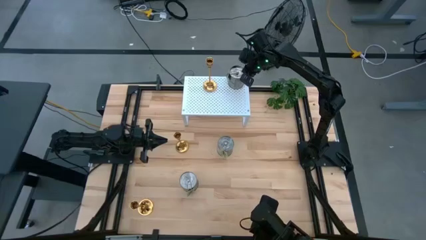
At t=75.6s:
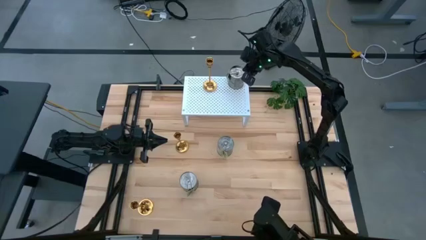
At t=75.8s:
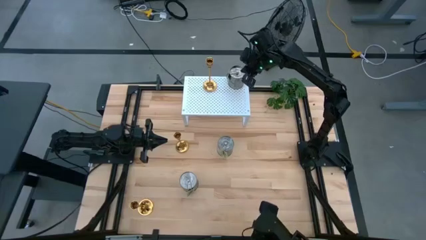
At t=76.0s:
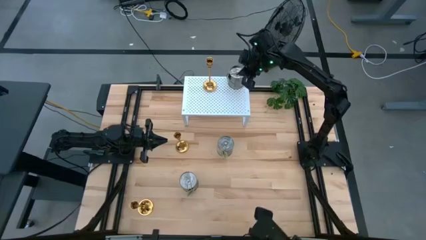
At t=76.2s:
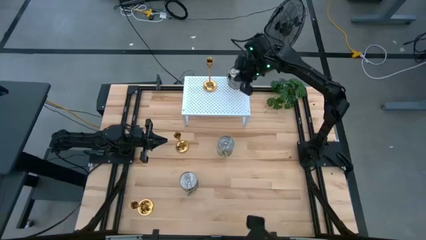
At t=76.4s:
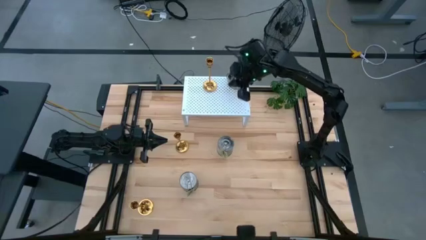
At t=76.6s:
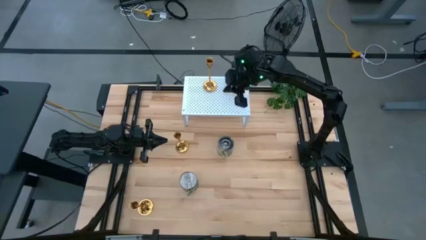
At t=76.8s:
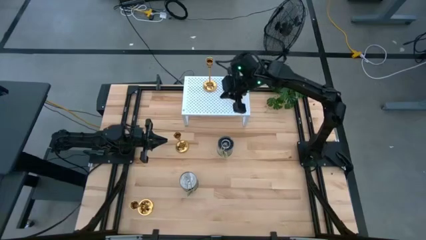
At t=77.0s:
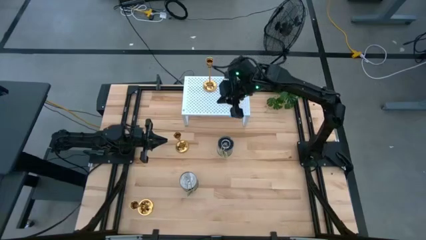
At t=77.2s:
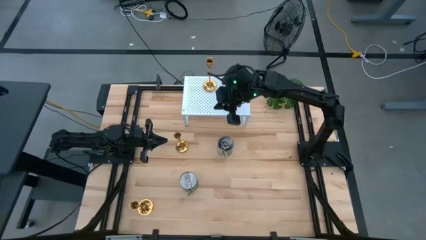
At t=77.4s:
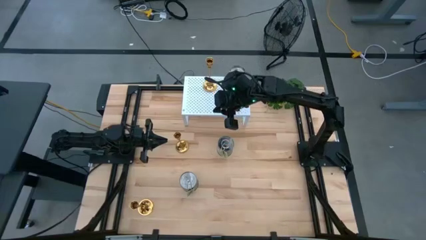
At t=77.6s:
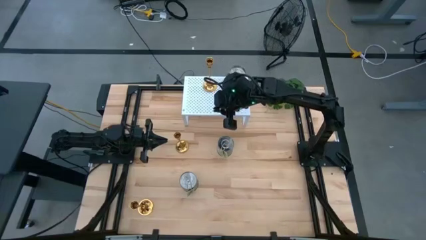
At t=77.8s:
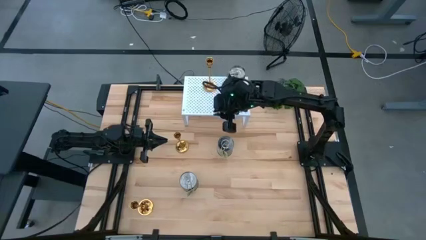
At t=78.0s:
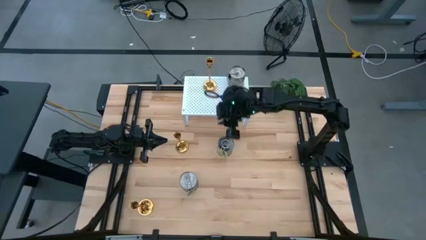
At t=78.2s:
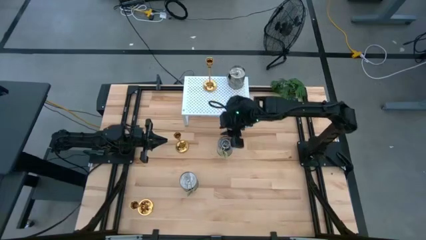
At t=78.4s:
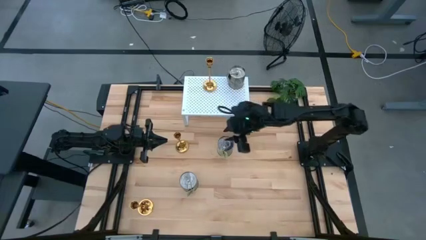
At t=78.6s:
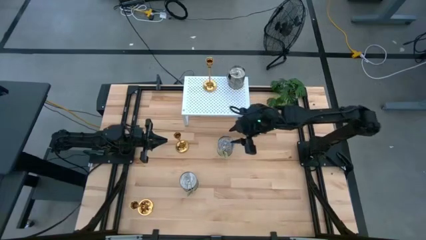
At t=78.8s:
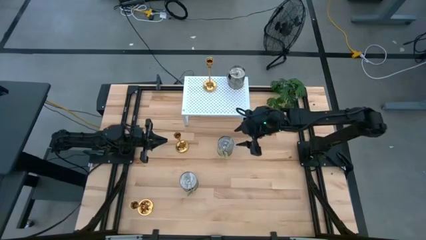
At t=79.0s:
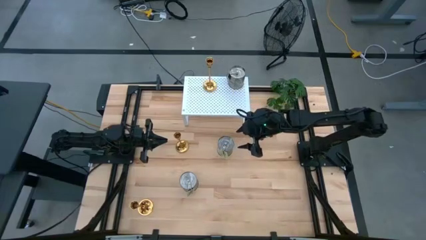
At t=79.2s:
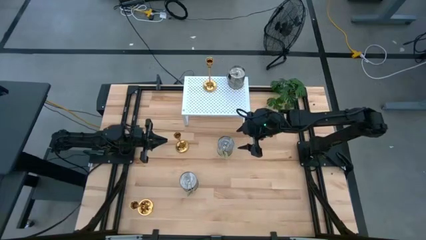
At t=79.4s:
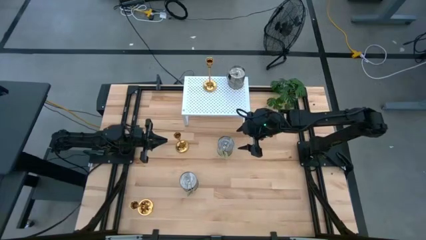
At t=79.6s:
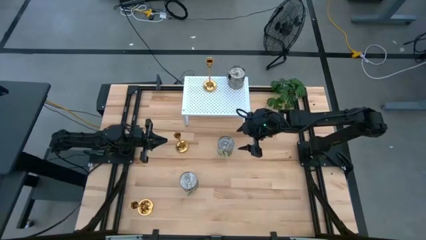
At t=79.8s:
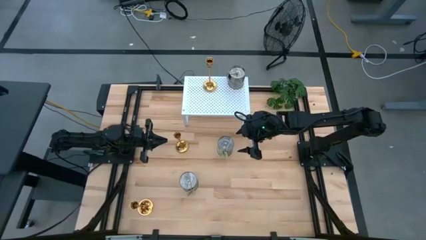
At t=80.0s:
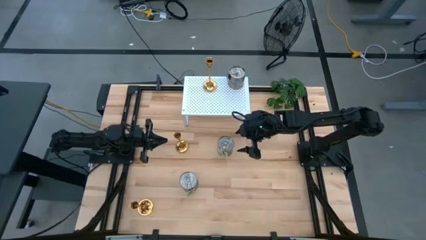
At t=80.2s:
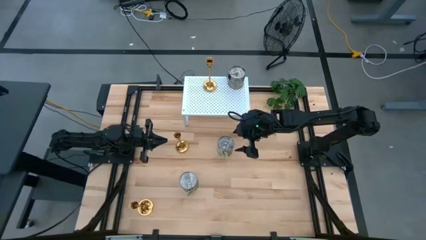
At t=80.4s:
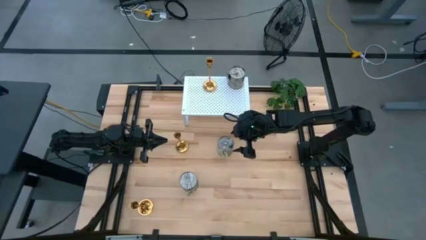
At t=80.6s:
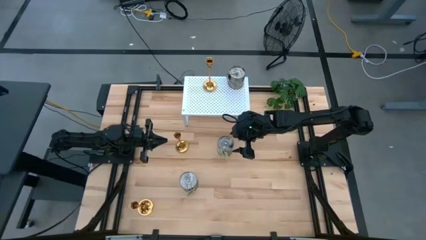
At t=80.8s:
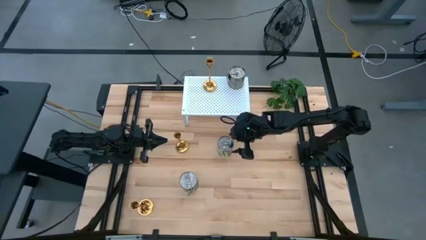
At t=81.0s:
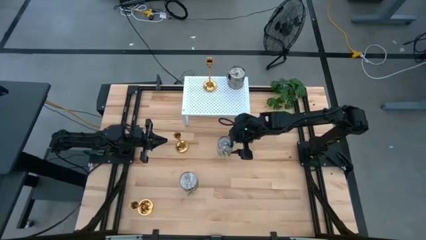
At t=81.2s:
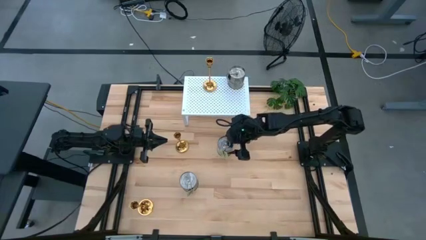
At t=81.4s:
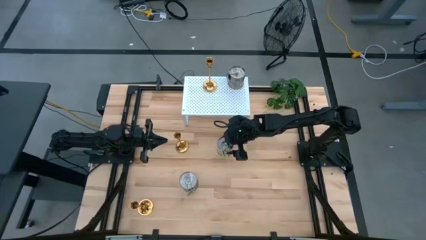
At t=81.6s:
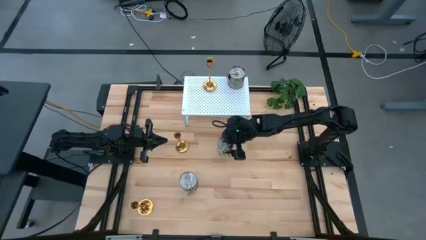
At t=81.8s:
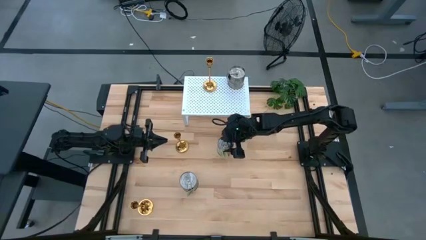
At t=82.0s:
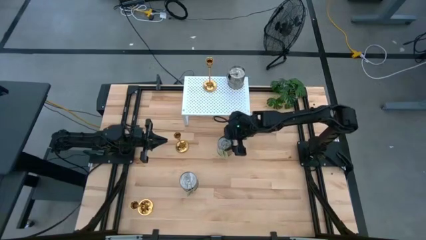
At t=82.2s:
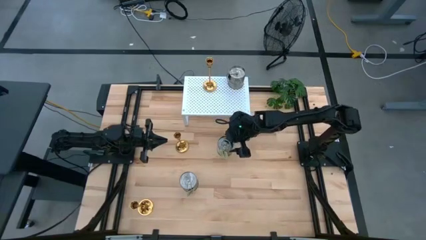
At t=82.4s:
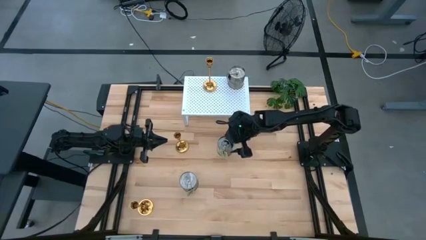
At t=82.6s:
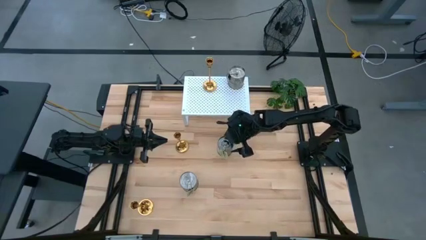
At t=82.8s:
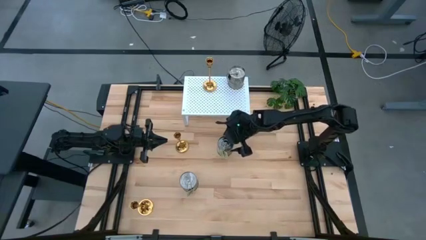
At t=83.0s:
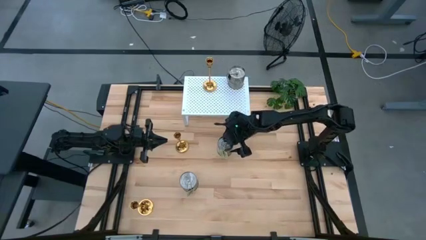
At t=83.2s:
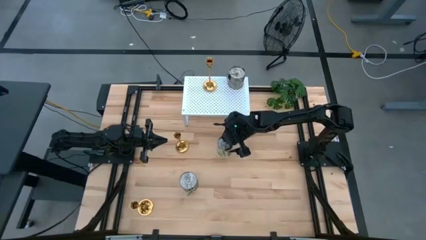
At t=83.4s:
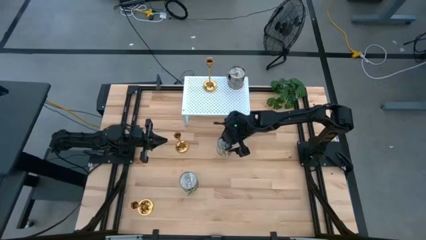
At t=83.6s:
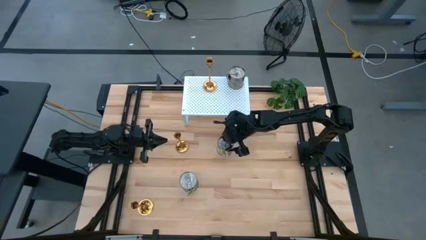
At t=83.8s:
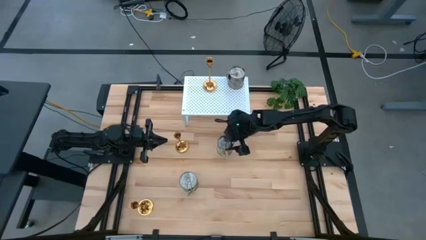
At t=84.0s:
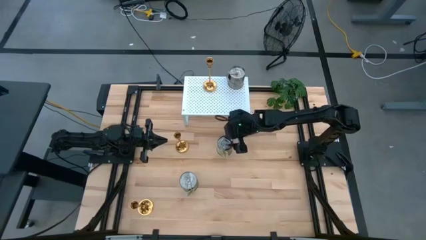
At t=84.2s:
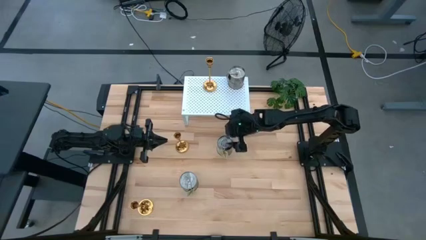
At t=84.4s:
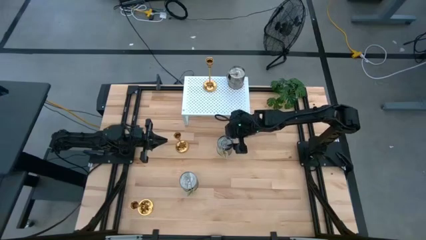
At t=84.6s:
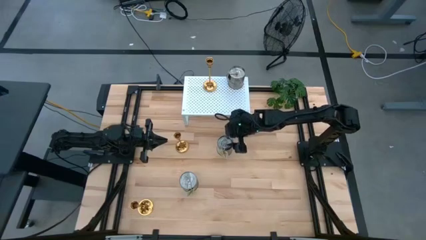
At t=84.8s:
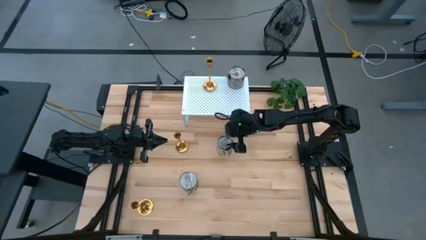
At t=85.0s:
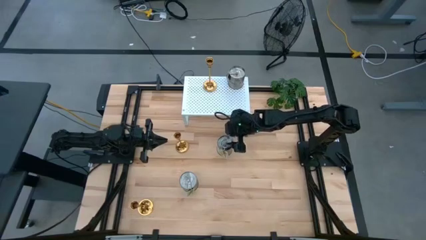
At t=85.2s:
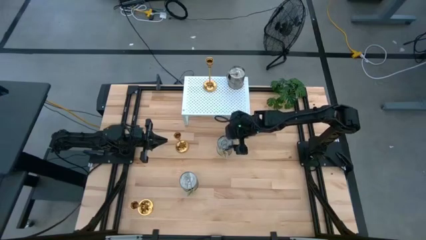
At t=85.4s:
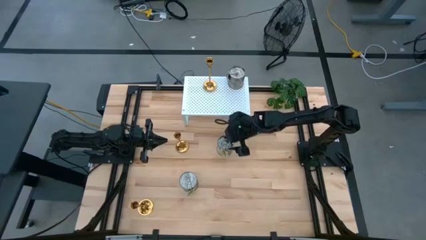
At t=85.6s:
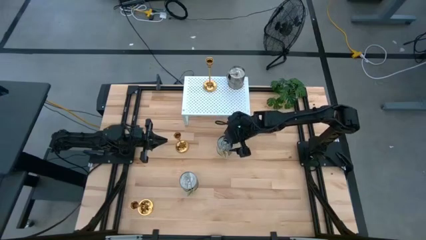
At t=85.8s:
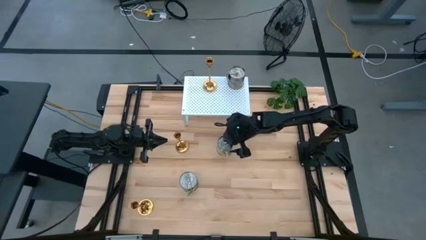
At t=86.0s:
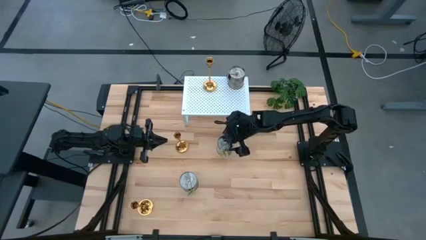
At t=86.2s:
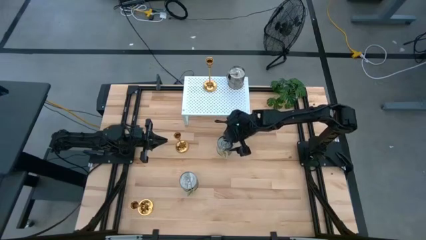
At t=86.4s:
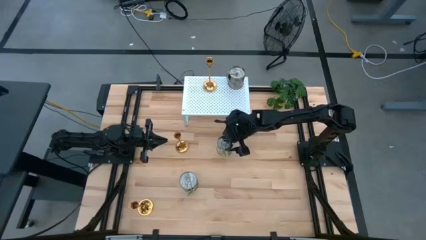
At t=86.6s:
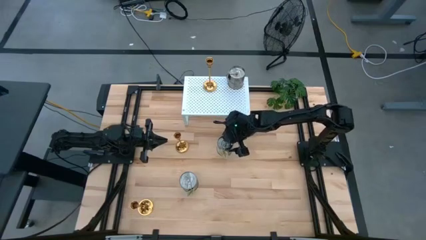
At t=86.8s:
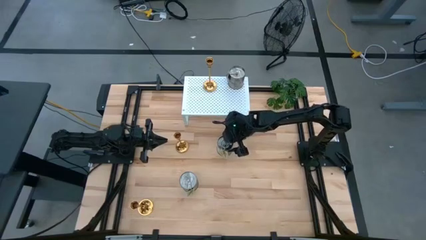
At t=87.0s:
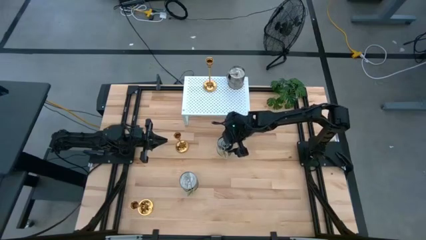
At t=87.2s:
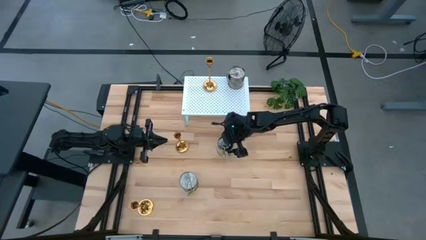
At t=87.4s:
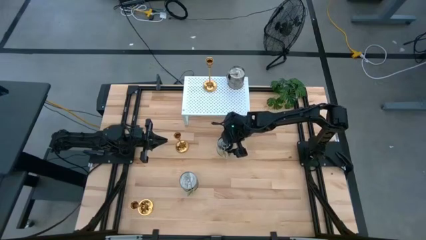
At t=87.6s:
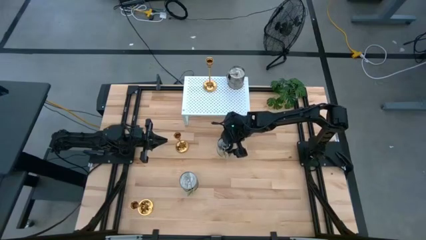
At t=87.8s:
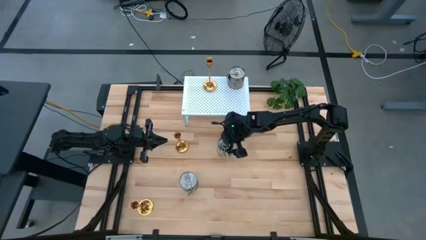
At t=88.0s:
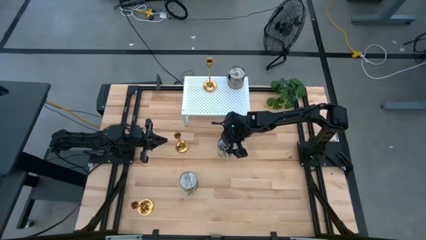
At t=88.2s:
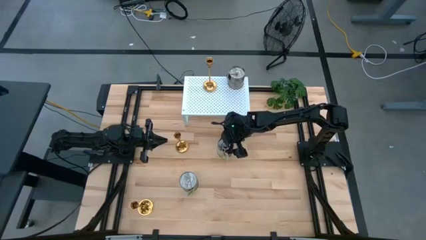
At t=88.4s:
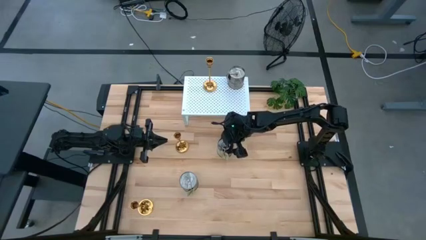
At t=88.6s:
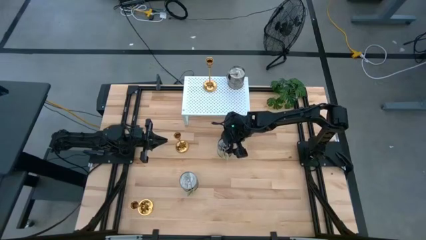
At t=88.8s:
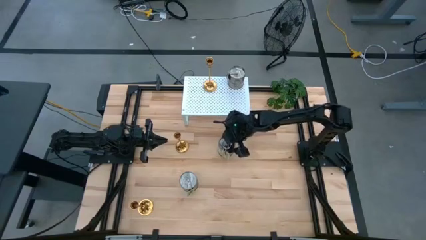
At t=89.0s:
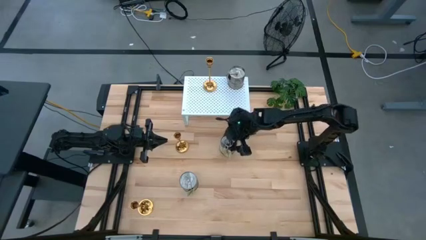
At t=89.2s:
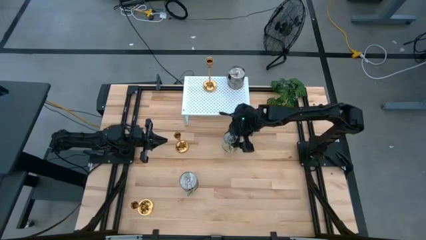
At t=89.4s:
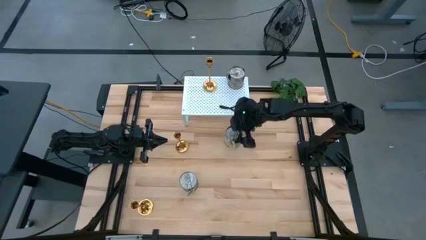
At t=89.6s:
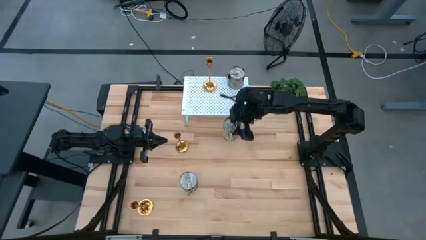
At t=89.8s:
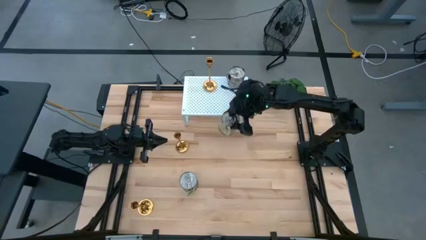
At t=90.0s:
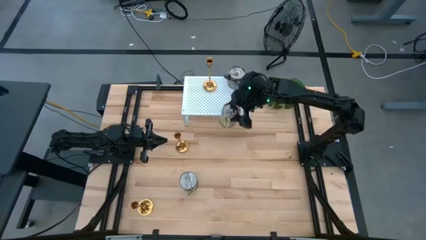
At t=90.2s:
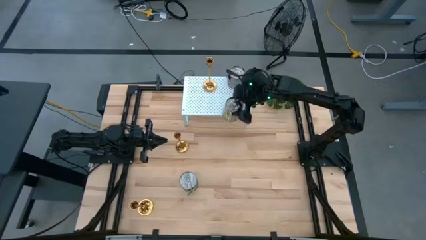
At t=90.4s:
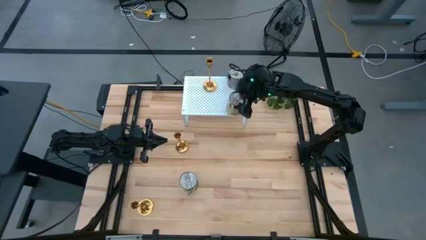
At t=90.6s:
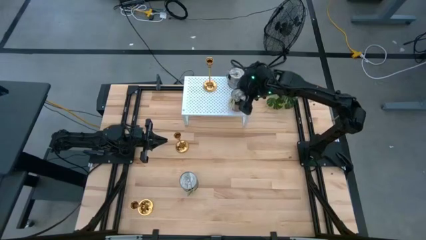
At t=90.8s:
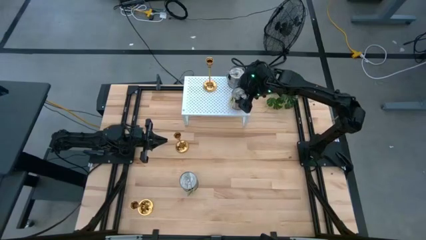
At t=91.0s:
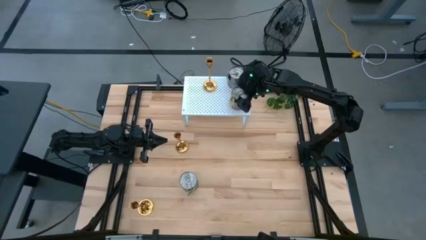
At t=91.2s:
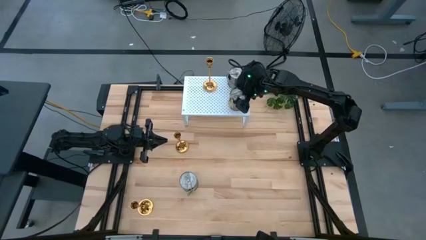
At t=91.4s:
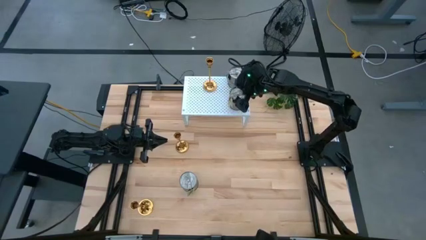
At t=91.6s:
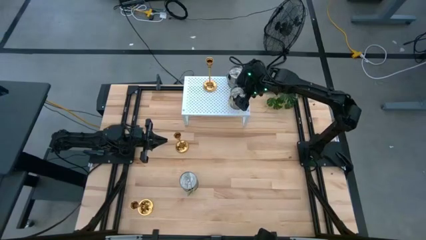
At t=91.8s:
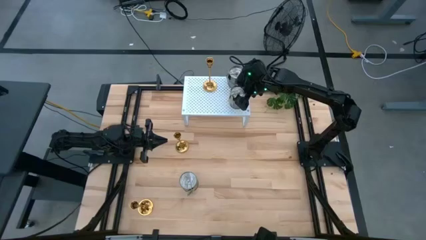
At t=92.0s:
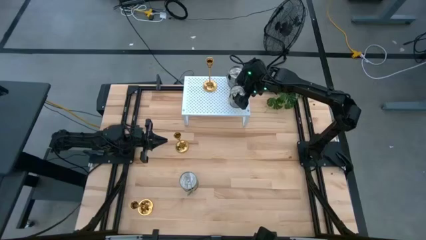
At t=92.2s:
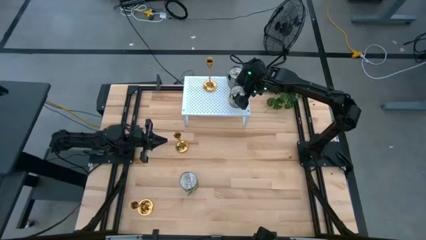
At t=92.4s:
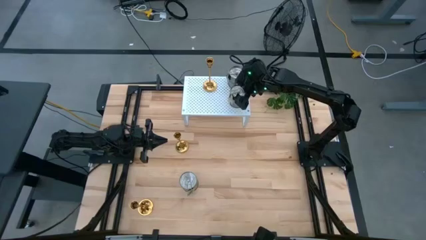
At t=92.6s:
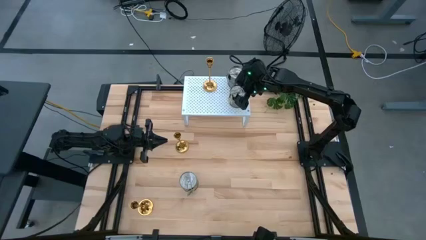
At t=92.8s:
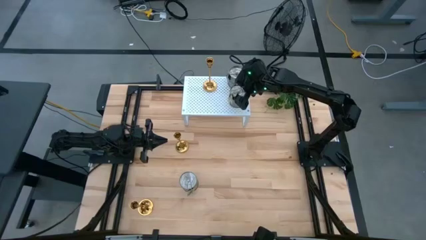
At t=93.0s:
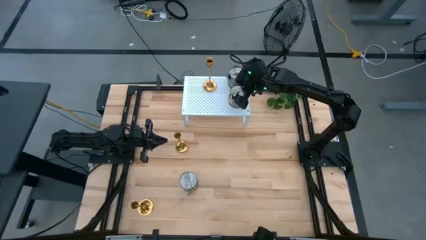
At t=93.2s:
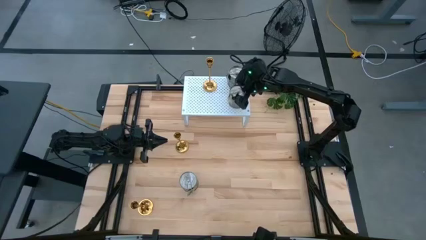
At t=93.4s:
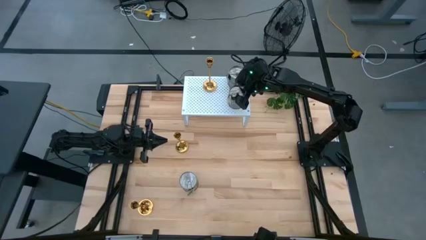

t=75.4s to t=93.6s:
Task: Pick & Place candle stick holders
Put the middle scented candle can aligned with the other scented candle on the shelf
